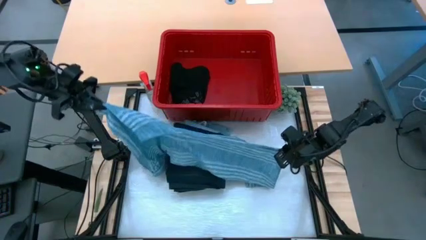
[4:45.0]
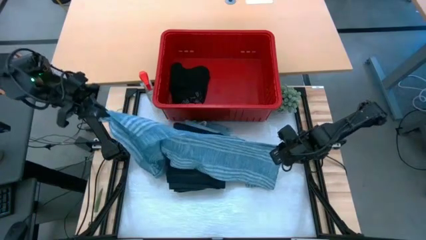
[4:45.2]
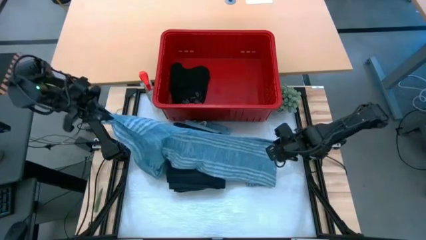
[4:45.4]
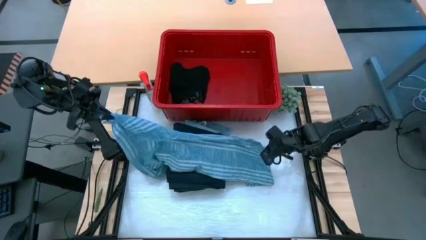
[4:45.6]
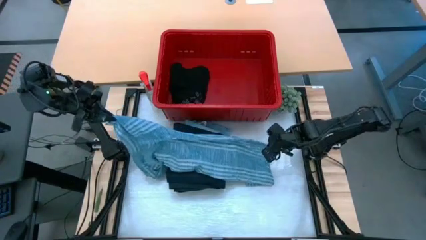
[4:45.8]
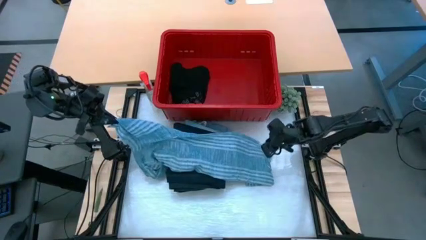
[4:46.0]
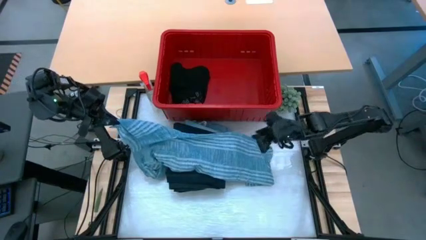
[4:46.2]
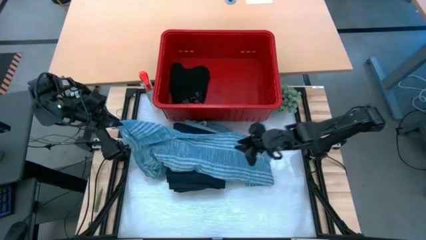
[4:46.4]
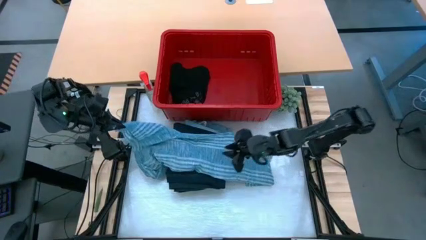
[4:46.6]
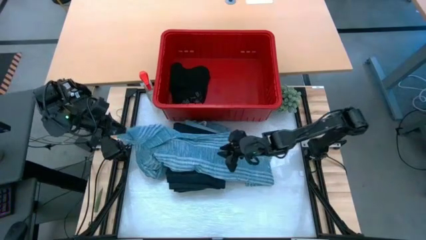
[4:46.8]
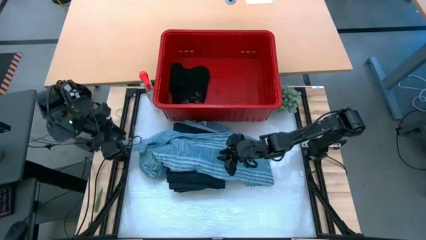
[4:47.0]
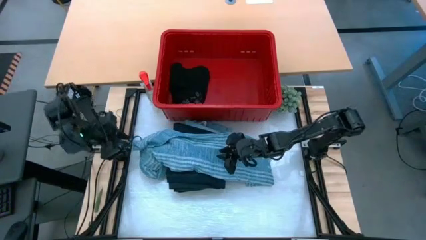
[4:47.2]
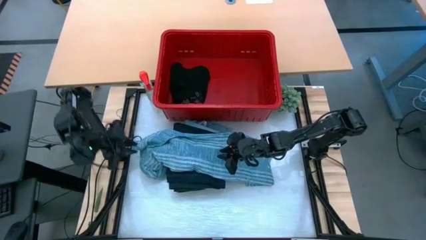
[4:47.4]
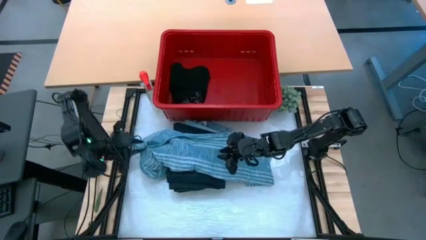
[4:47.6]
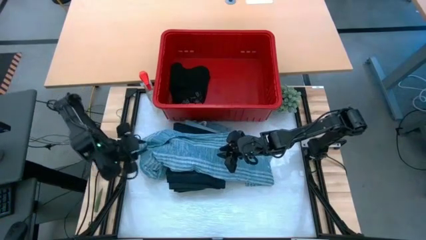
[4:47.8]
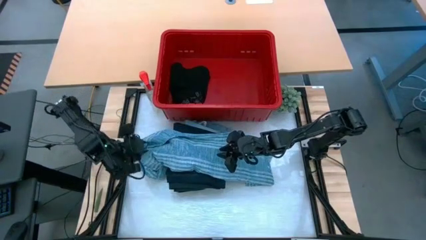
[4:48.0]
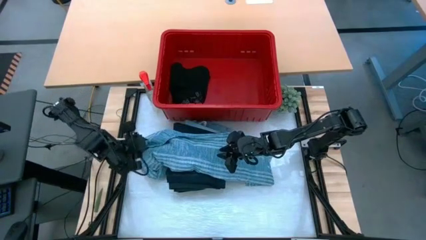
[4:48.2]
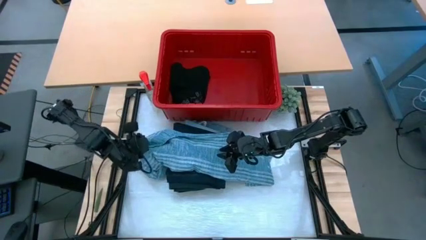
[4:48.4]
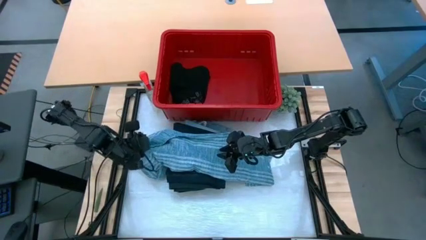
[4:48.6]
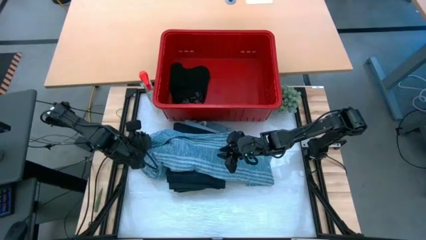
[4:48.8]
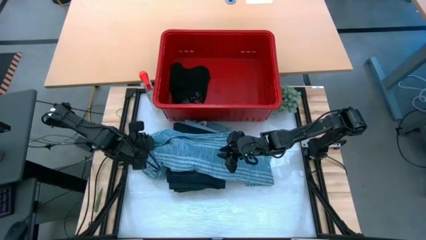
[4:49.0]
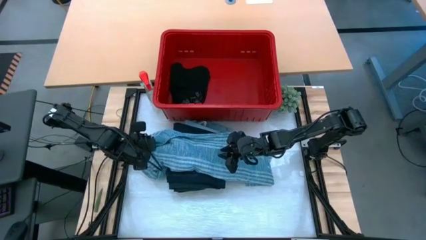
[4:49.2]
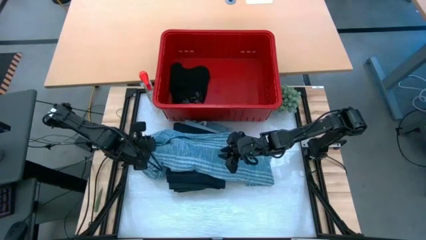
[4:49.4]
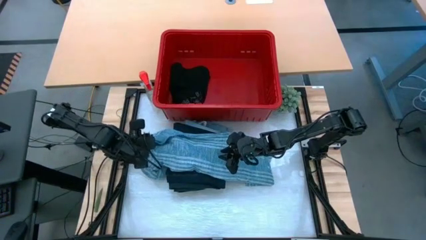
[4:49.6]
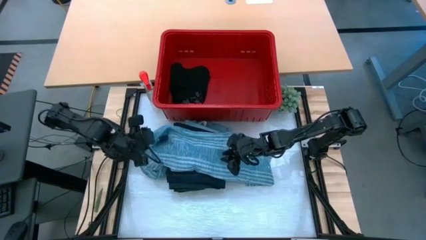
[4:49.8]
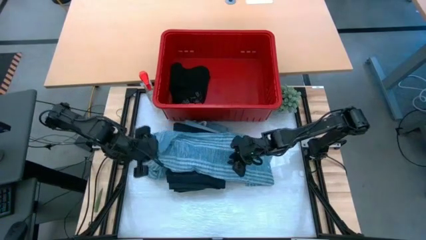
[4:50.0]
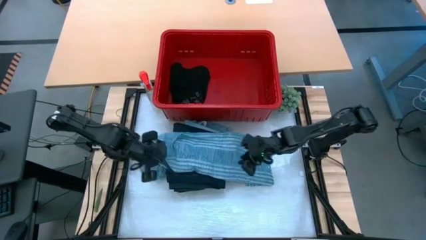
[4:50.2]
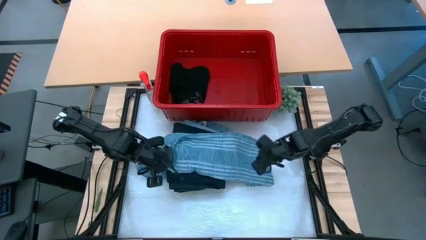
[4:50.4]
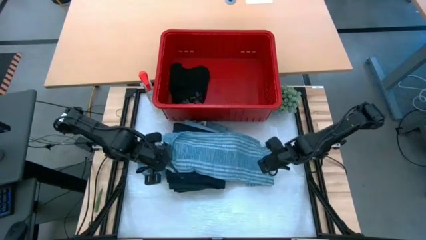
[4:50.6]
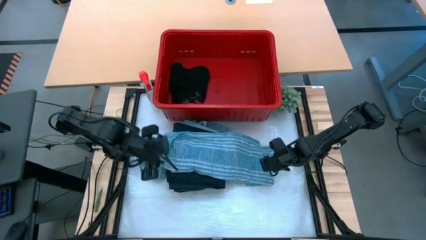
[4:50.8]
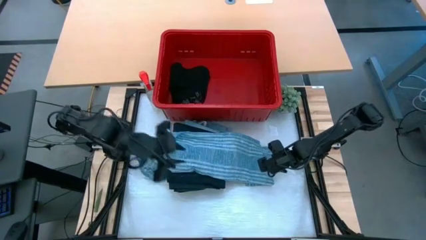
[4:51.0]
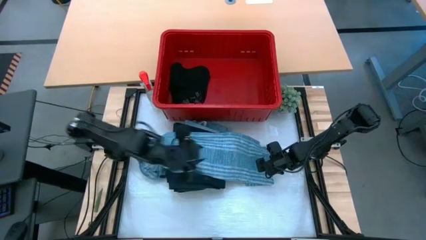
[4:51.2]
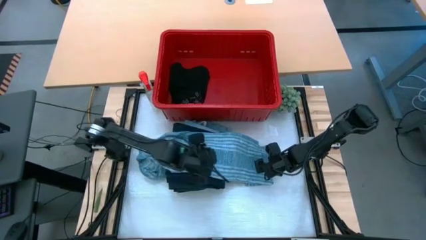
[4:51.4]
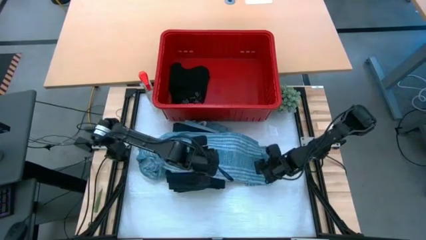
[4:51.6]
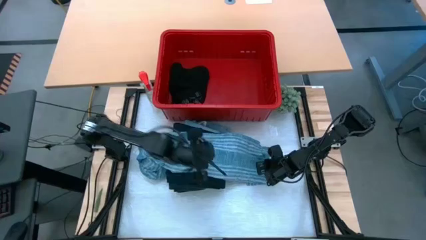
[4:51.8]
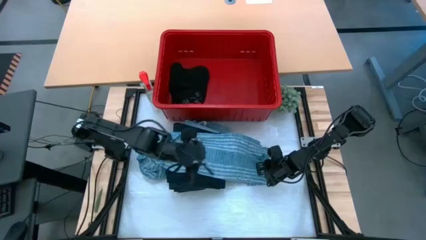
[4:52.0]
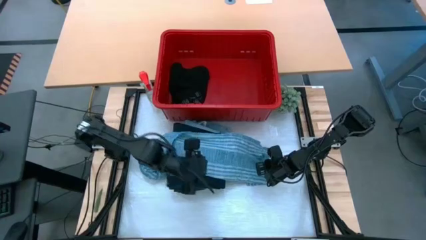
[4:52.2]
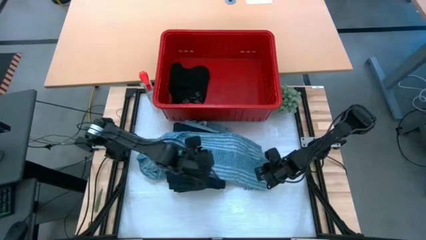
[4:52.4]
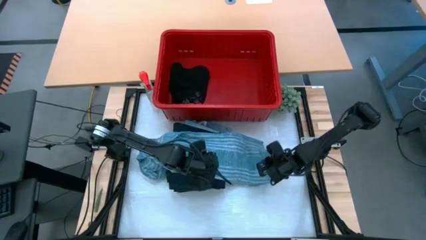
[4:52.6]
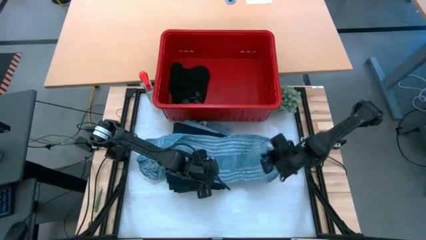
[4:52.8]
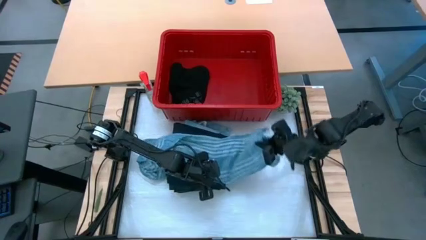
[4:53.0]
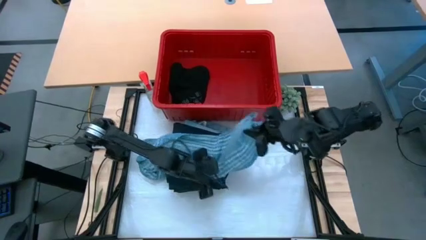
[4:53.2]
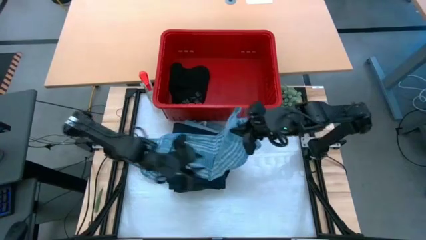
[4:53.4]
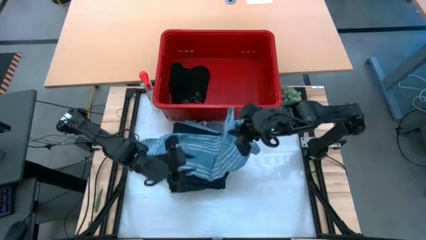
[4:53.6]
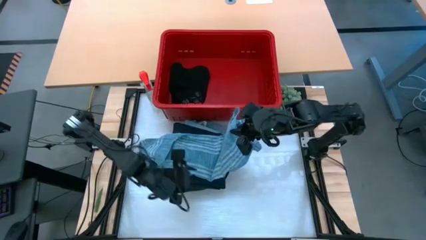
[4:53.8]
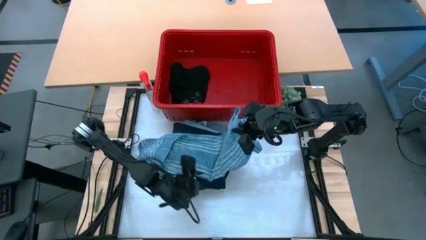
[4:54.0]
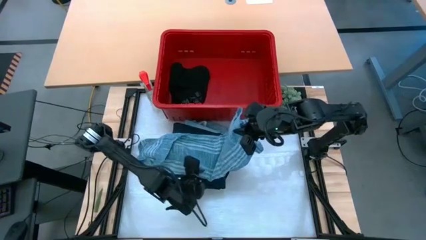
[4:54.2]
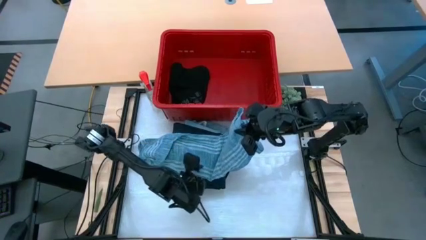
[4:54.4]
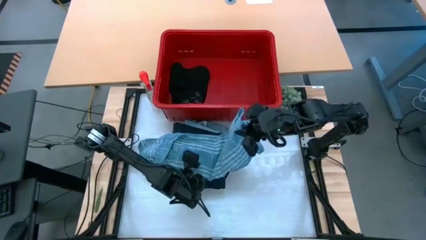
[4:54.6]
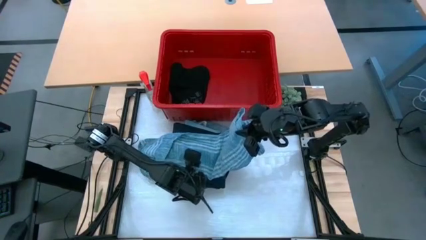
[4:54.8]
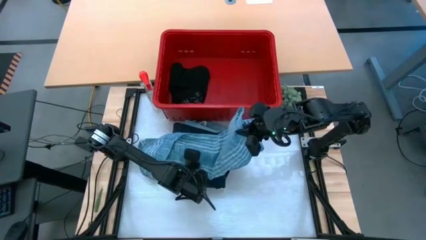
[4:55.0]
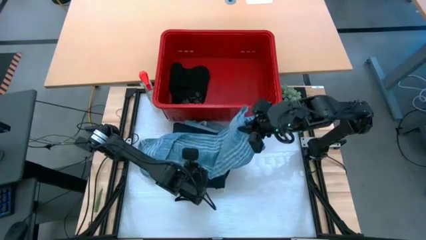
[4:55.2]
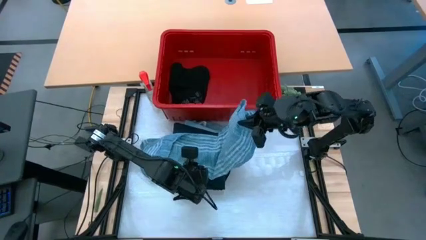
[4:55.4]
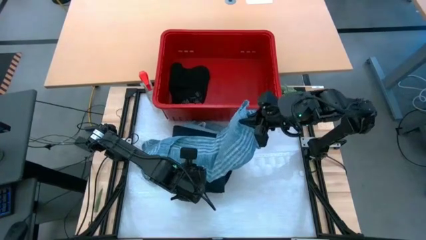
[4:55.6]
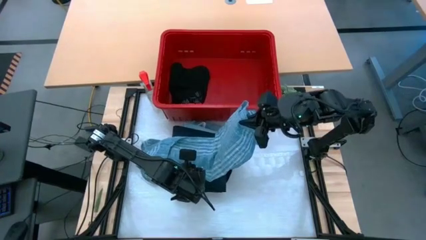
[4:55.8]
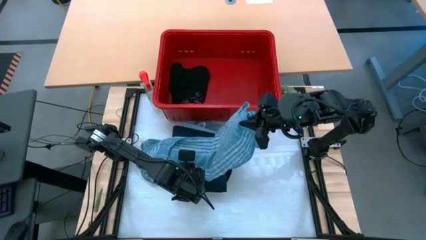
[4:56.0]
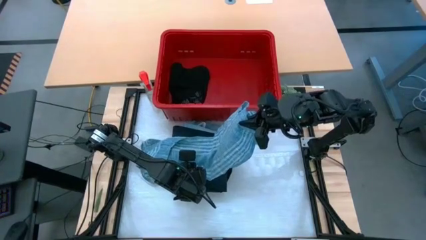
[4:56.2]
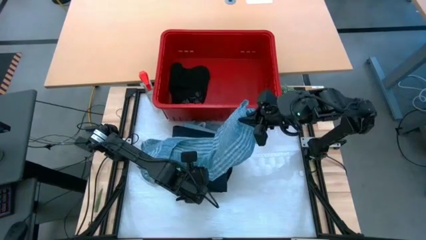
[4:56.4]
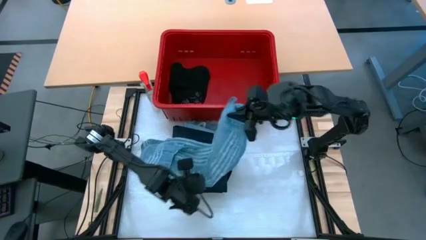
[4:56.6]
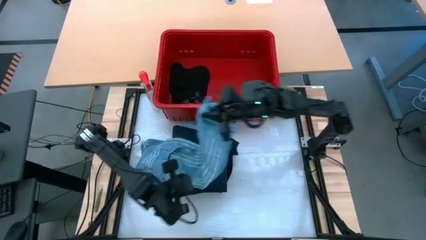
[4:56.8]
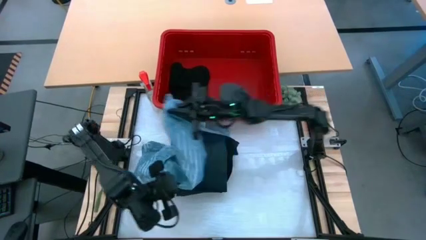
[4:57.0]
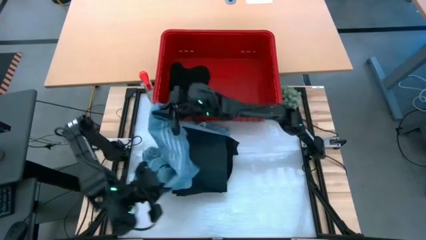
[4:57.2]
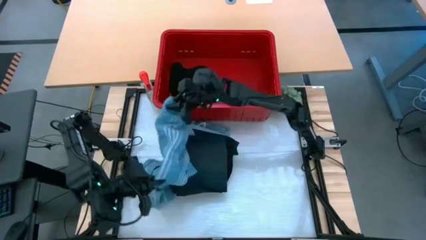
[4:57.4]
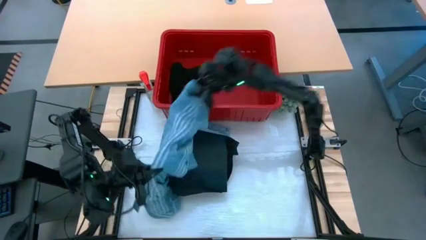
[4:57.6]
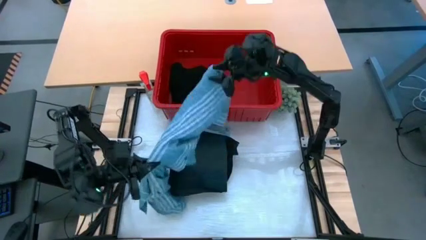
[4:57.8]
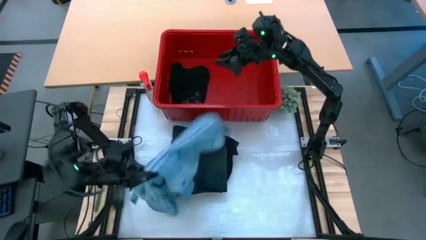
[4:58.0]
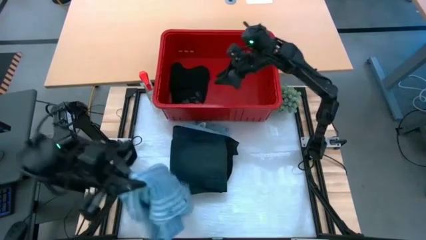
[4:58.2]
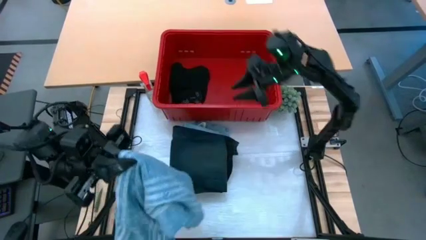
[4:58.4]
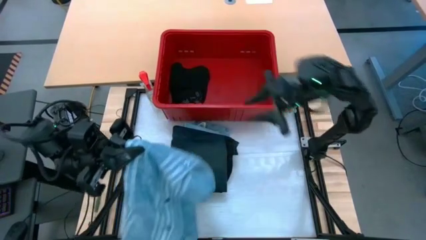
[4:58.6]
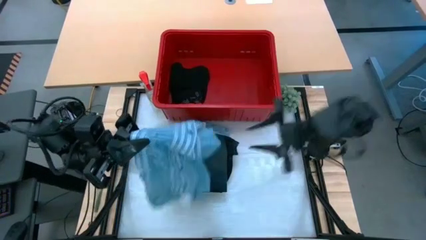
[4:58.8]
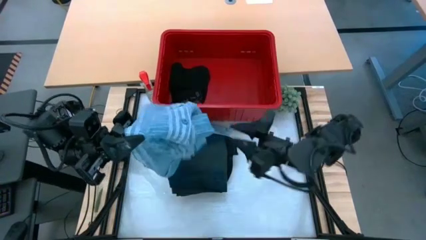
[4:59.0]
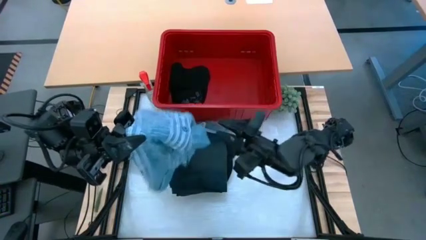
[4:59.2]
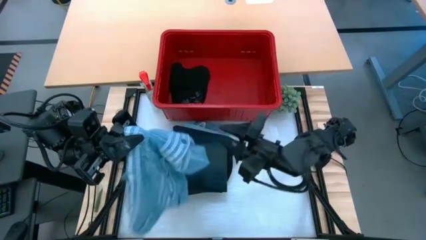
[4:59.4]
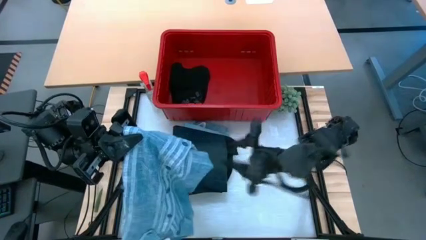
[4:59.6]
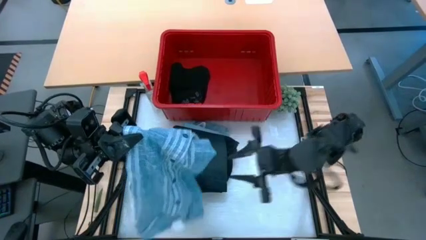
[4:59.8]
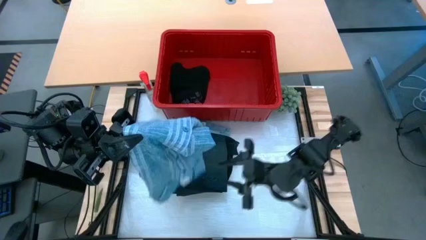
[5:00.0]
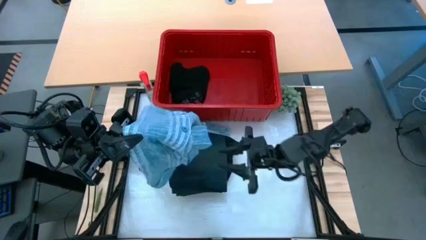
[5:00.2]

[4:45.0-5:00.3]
Task: Fold Laundry from Bin
Fold the blue and white patterned shirt

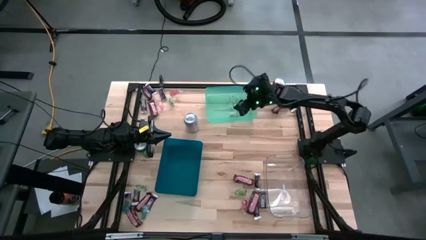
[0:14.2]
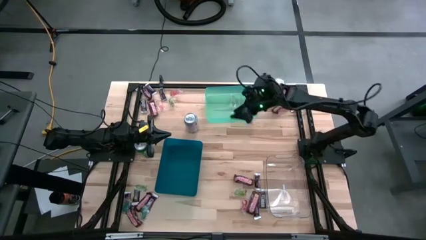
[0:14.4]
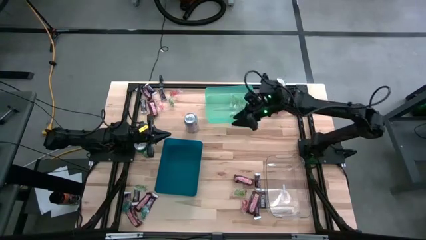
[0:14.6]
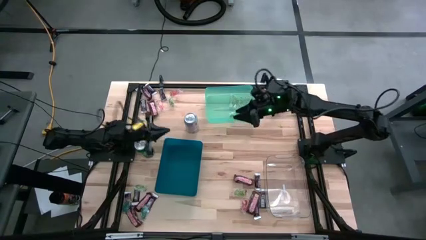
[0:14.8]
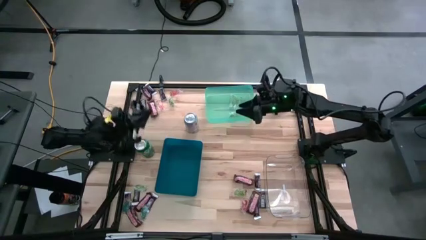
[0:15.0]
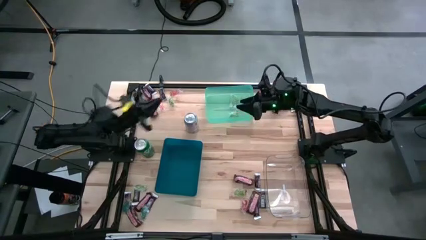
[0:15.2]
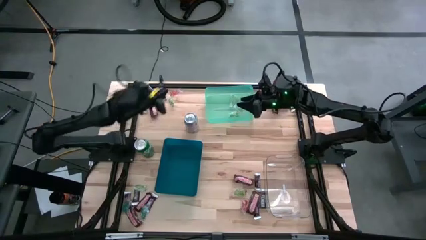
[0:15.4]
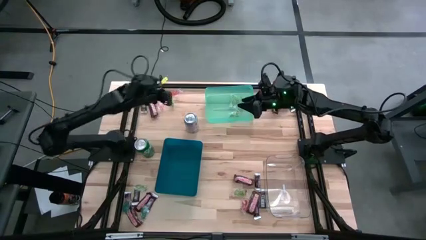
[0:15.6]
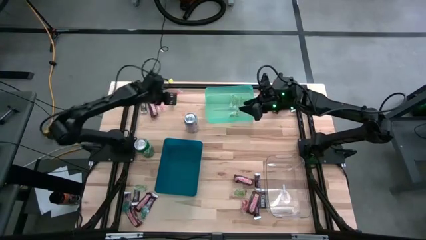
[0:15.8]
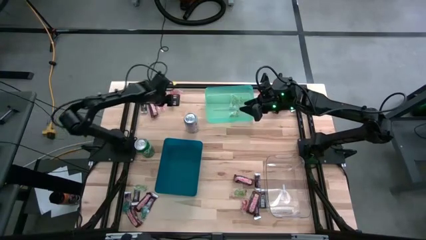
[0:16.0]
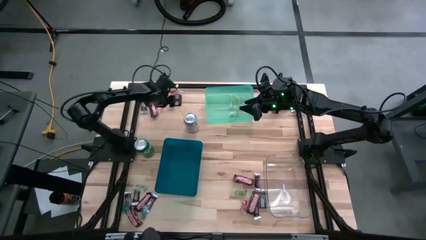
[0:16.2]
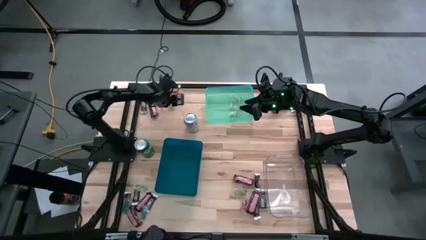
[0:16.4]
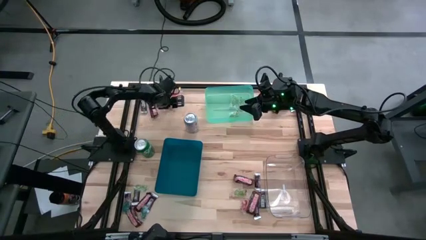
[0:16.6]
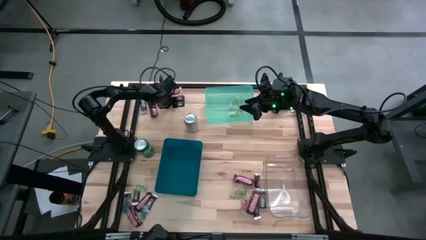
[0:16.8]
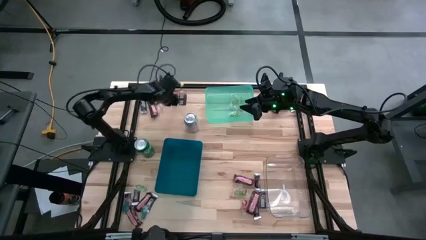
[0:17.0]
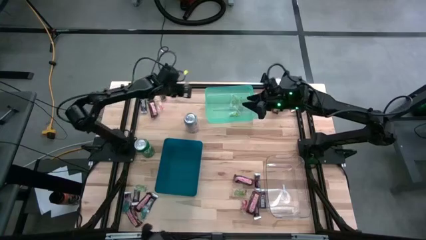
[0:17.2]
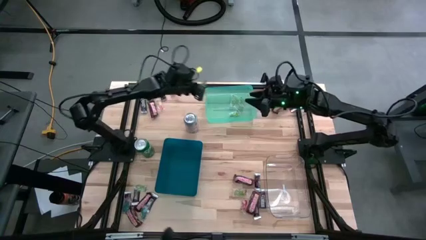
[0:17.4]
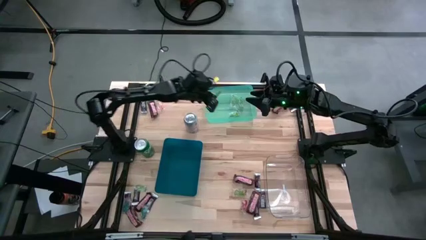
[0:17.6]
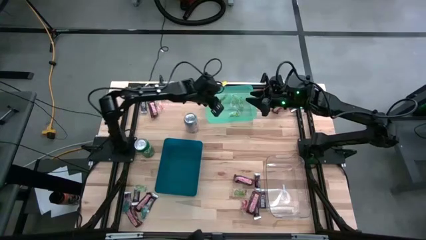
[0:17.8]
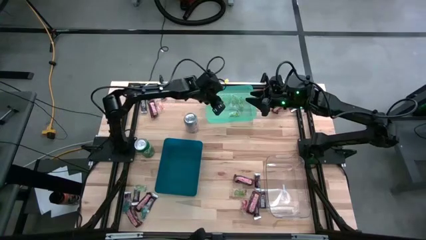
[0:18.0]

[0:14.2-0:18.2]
Task: Organize candy in baskets
Put the transparent gummy into the green bin
